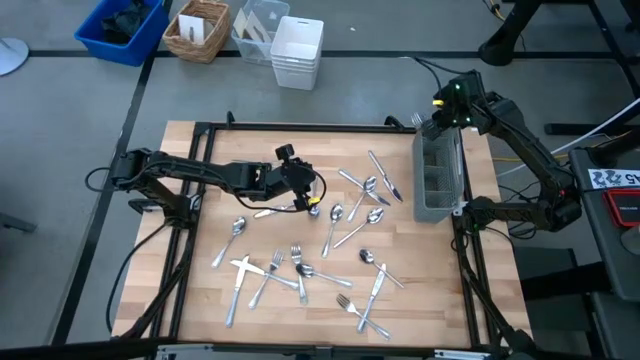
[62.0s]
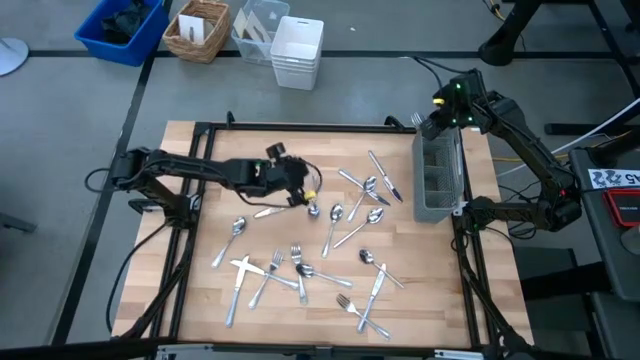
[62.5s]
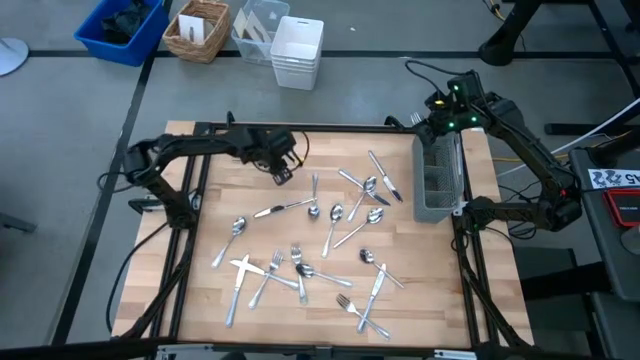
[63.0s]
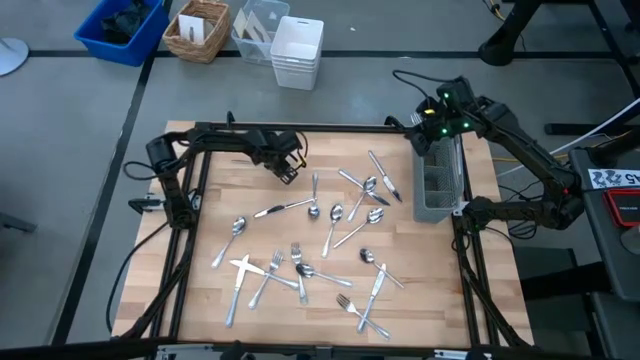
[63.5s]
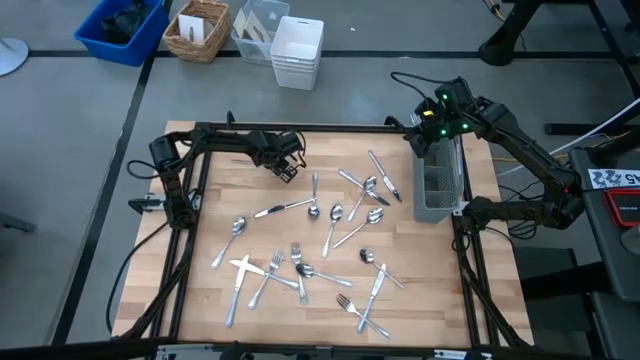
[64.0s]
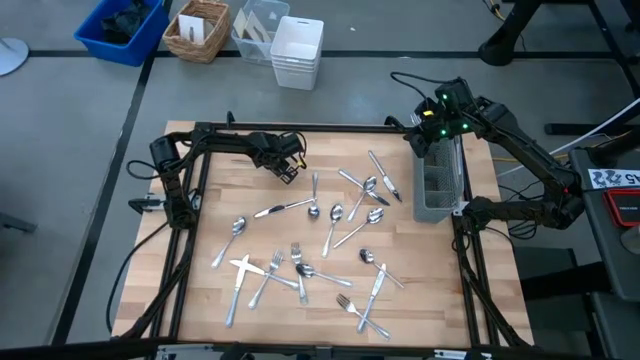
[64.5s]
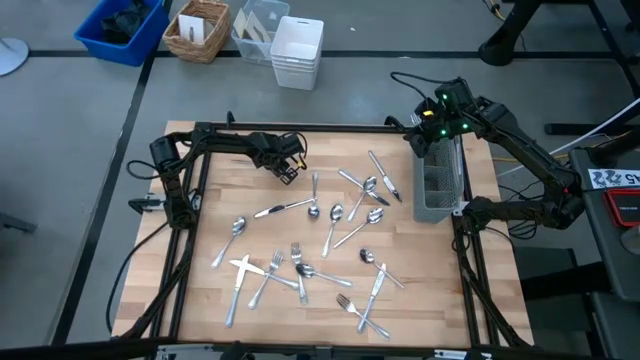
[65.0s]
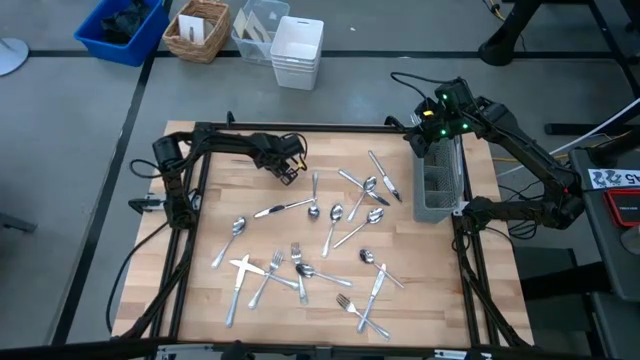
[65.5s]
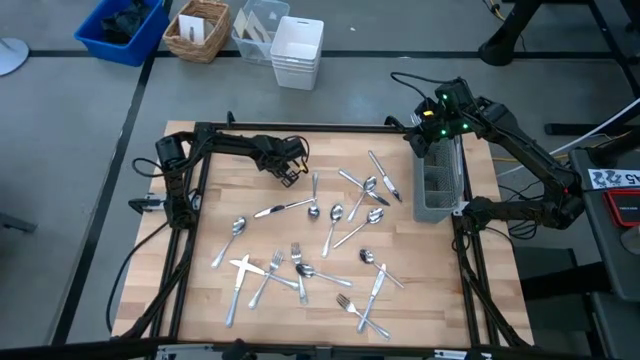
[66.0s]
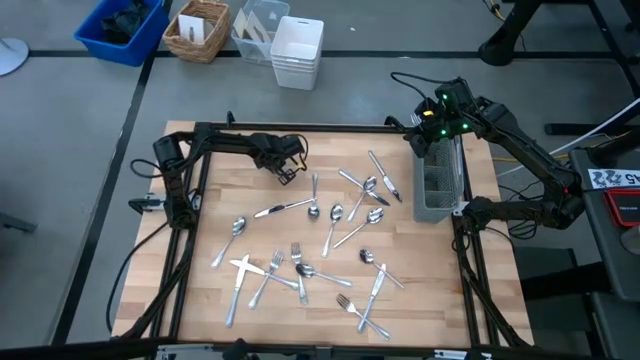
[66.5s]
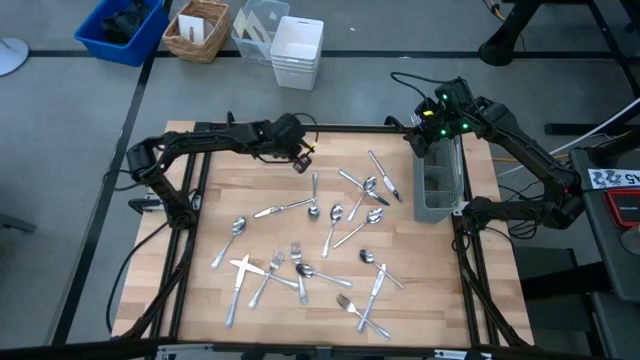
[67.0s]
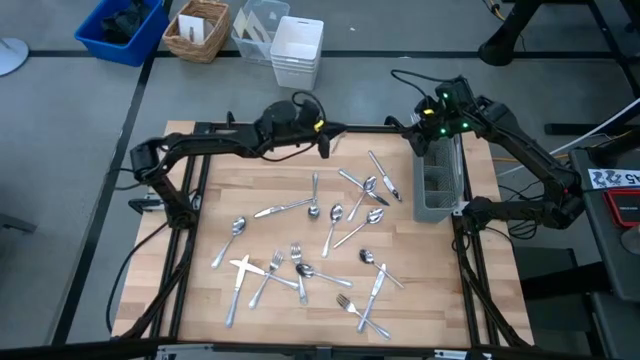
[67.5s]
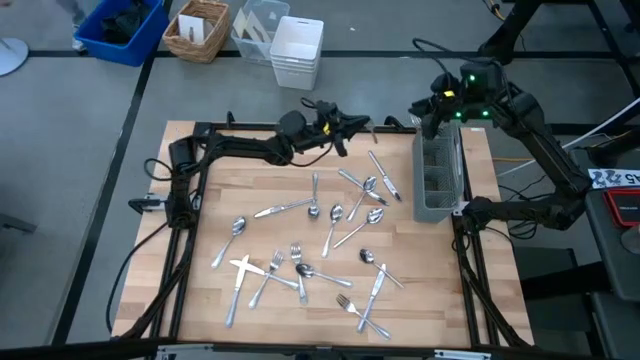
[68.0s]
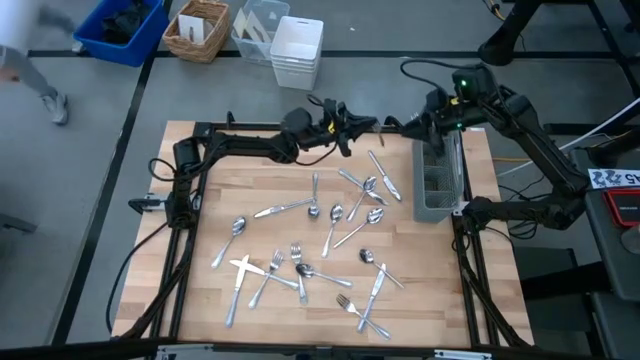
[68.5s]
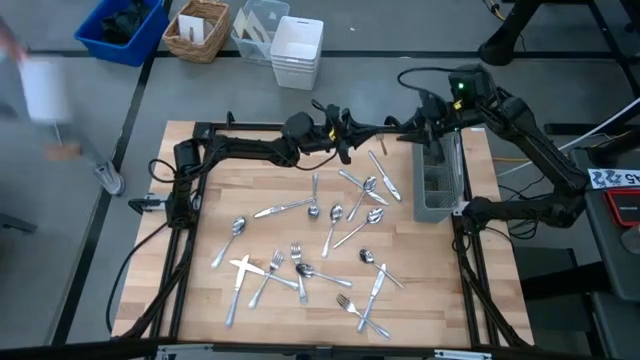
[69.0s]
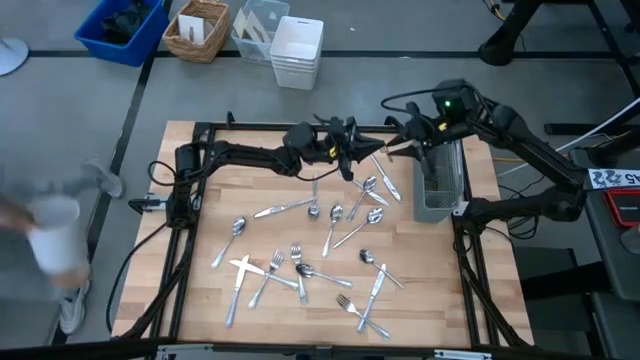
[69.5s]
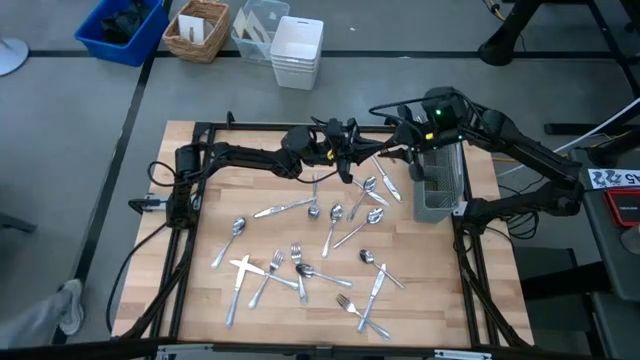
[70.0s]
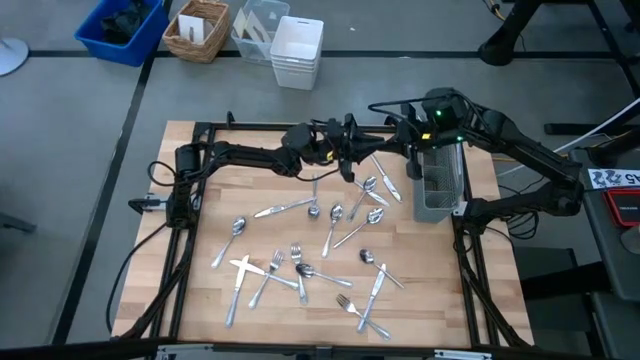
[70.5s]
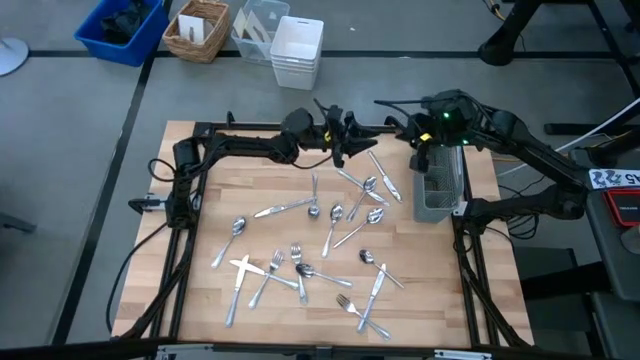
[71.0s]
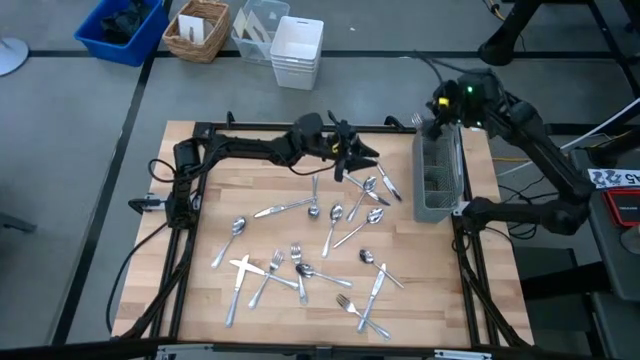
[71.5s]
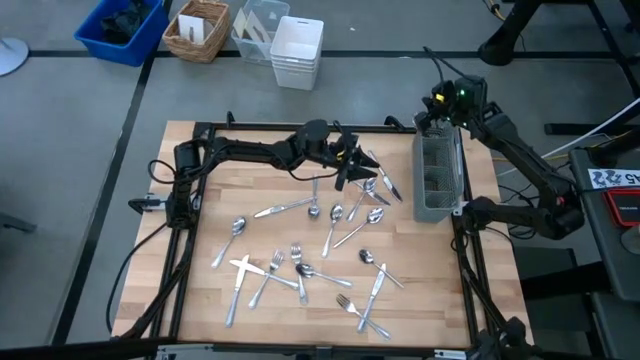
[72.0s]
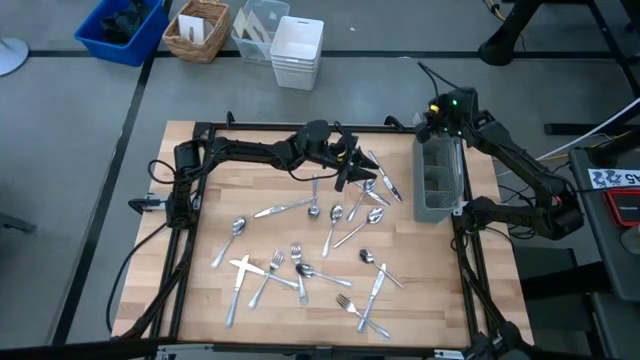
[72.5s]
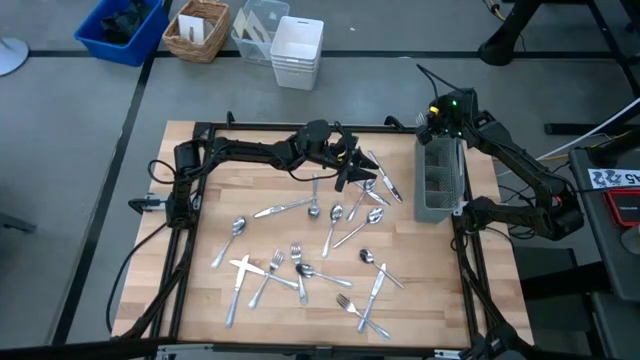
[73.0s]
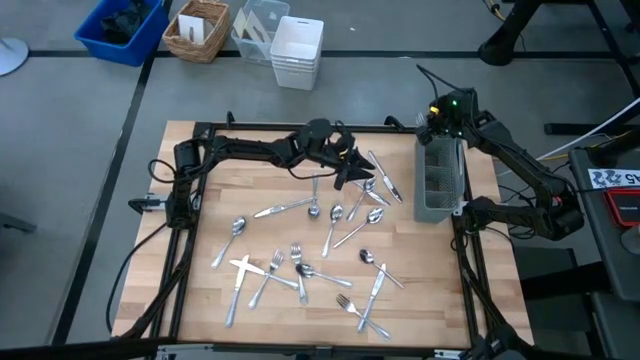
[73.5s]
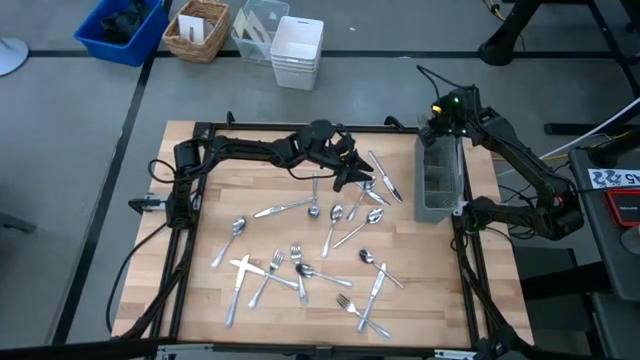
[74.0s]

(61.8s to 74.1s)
Task: Sort silverware
Put the fork into the left section of the utensil holder

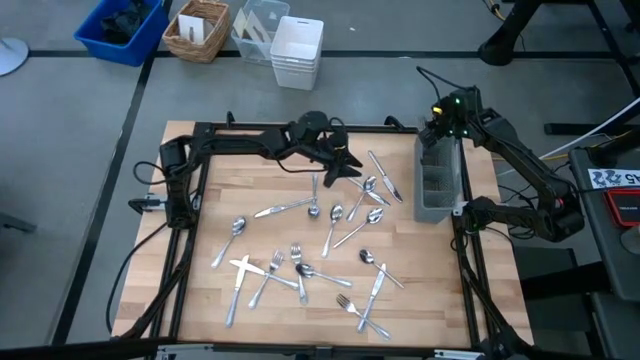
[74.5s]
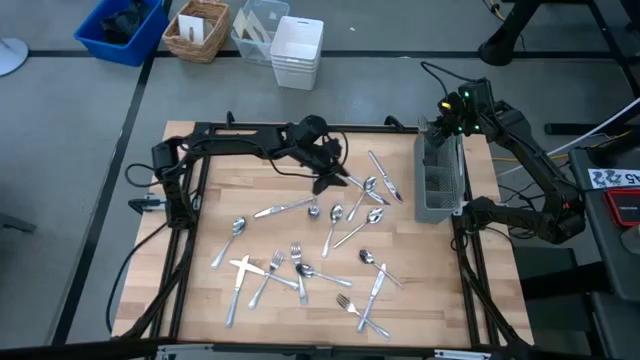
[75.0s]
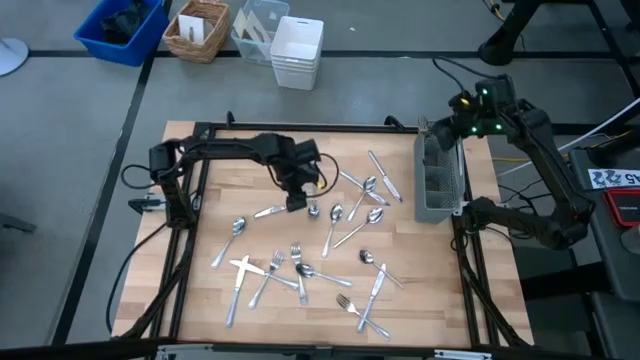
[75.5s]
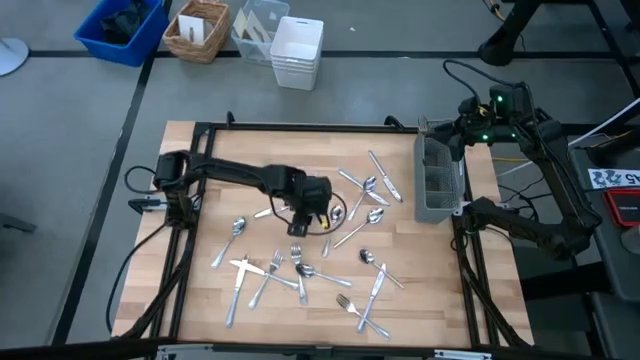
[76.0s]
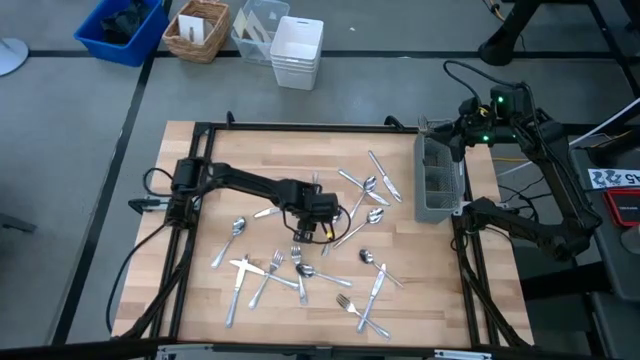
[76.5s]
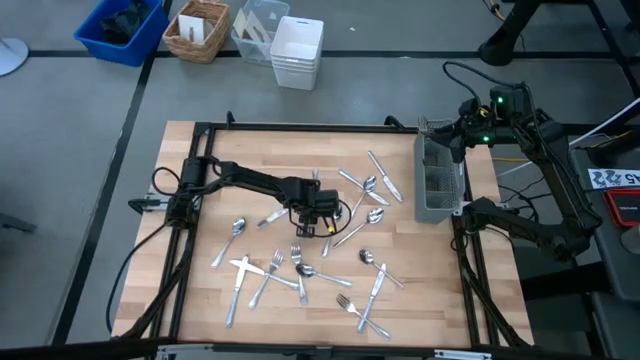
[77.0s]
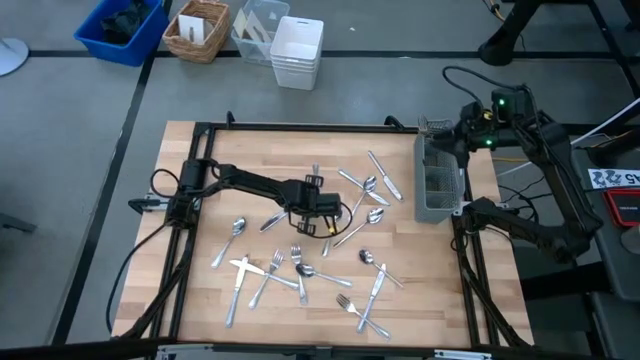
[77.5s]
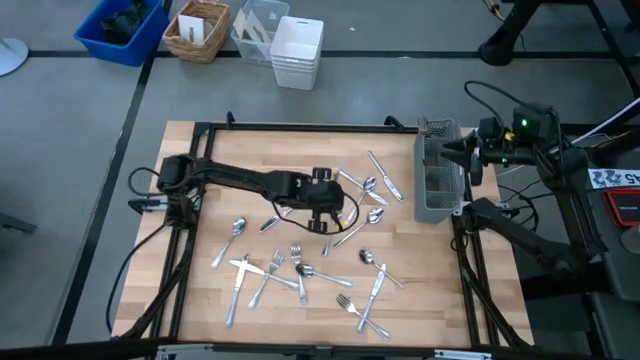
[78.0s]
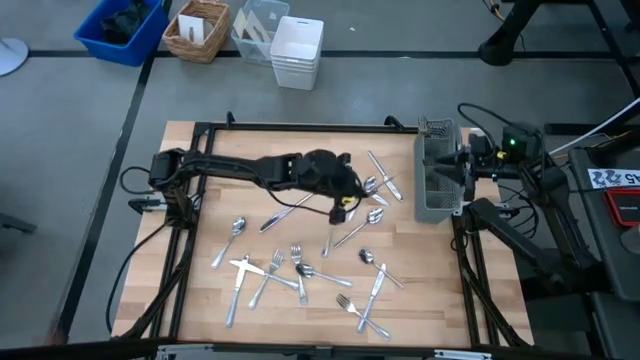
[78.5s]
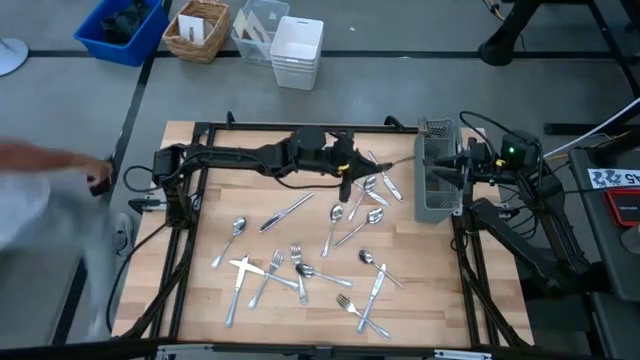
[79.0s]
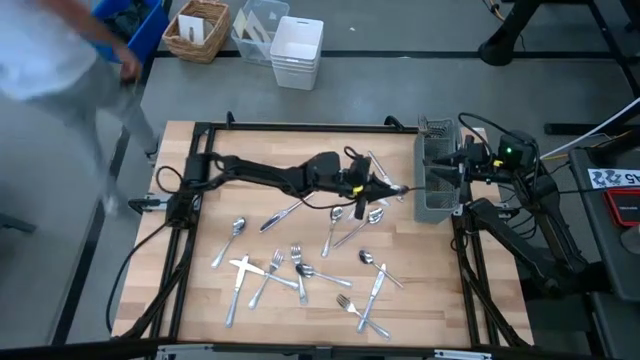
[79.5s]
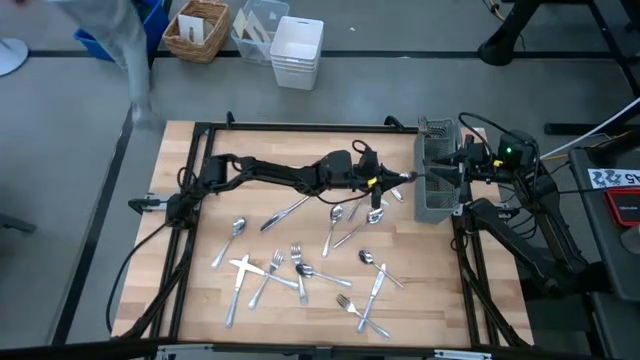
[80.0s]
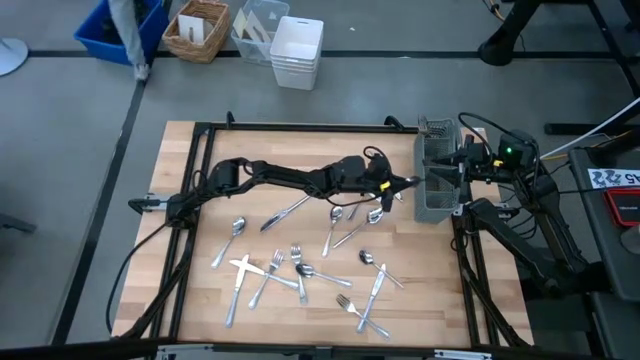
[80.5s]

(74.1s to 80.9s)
Put the spoon into the right section of the utensil holder

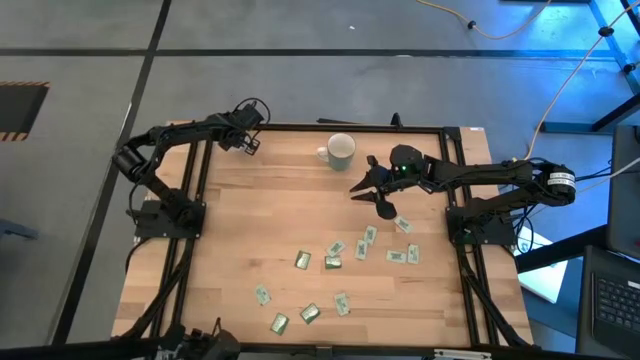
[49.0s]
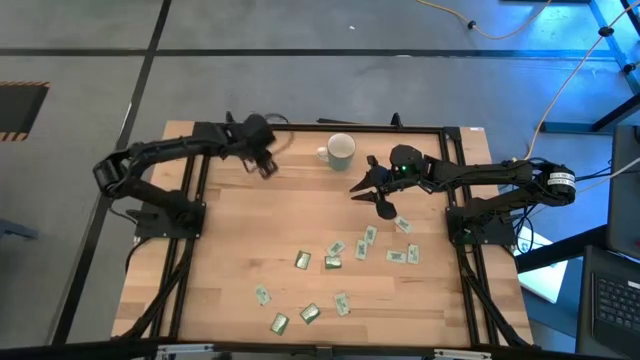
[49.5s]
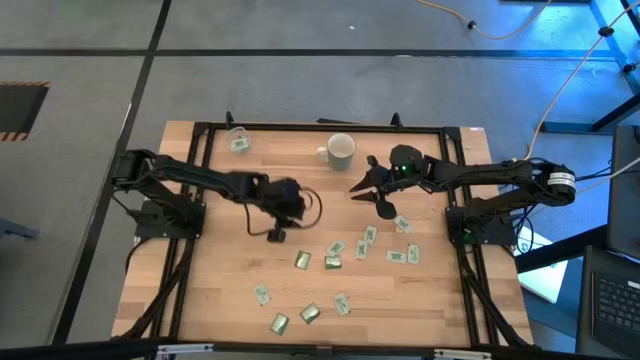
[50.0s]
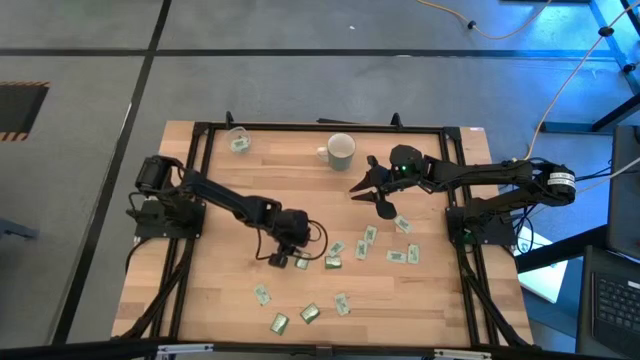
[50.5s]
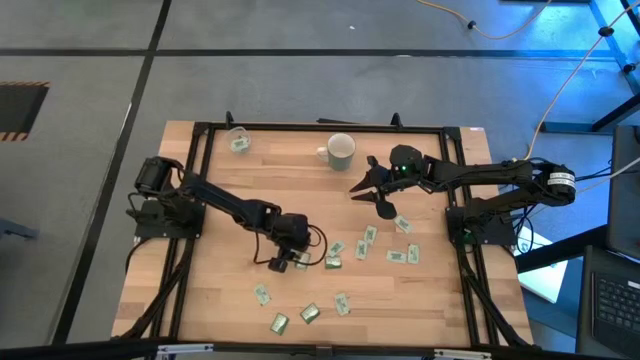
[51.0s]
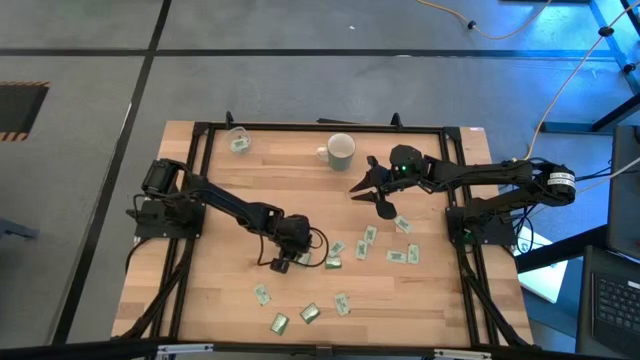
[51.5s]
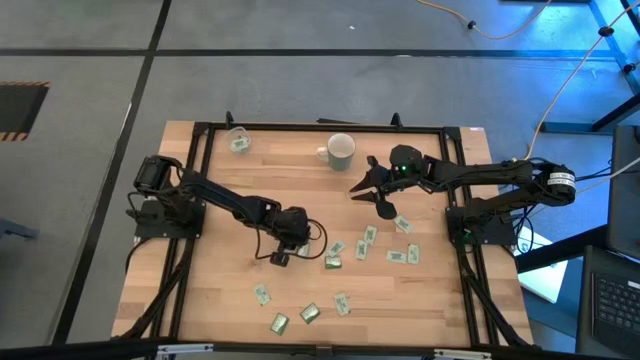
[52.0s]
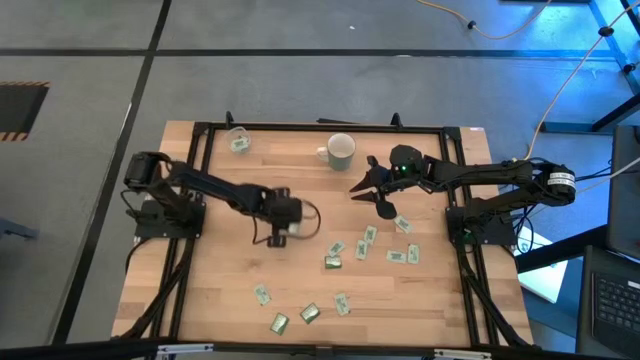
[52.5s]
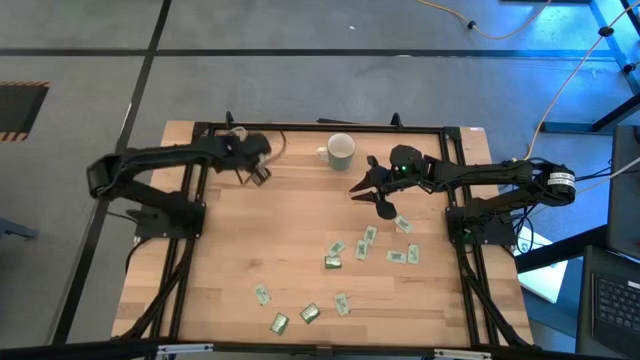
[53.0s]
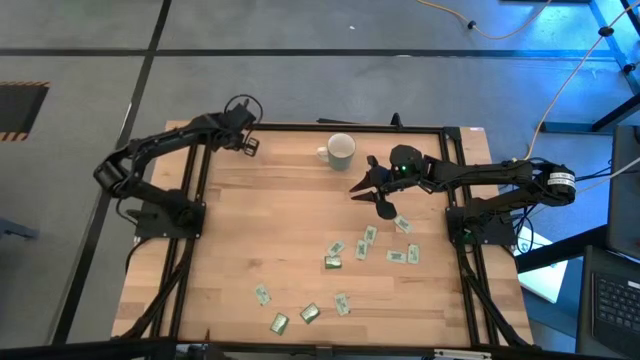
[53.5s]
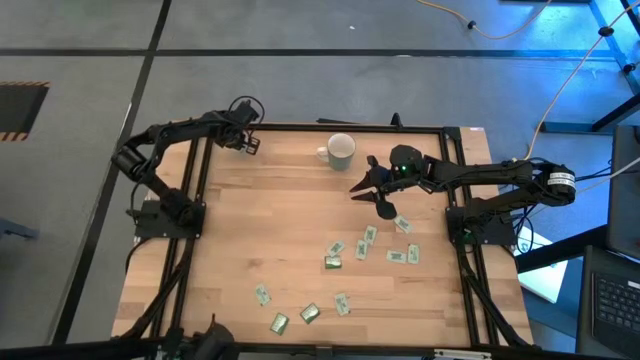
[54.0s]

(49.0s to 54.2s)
Task: Pick and place Stevia / Truvia into bins
Put the truvia packet into the transparent bin
